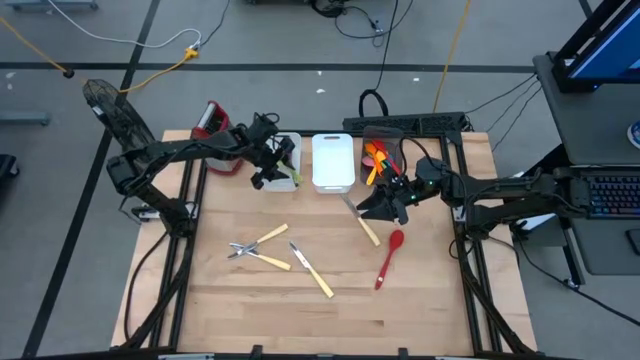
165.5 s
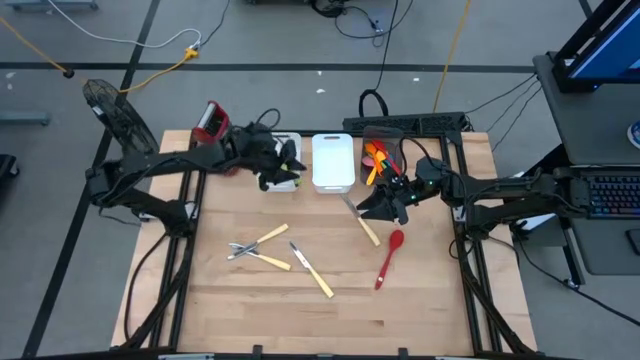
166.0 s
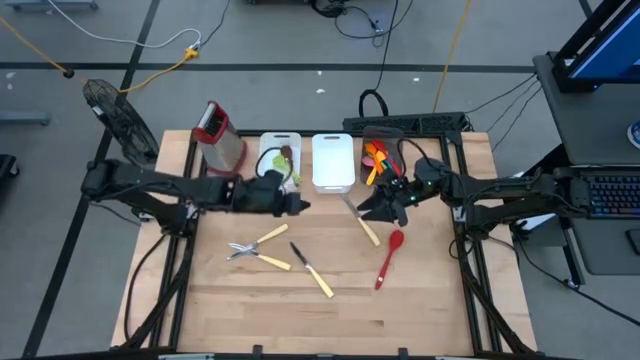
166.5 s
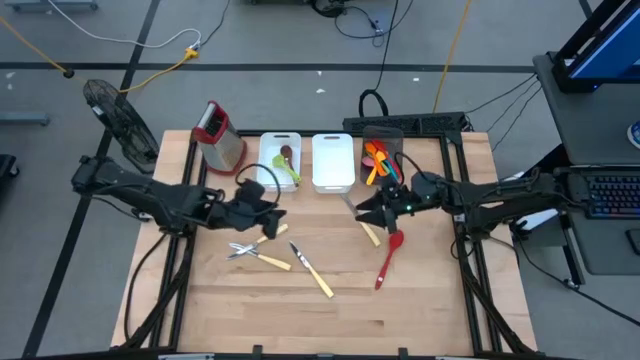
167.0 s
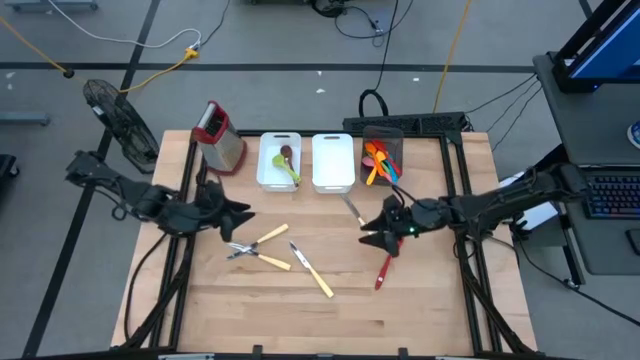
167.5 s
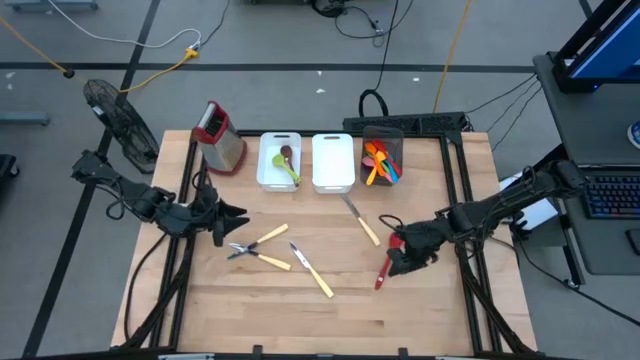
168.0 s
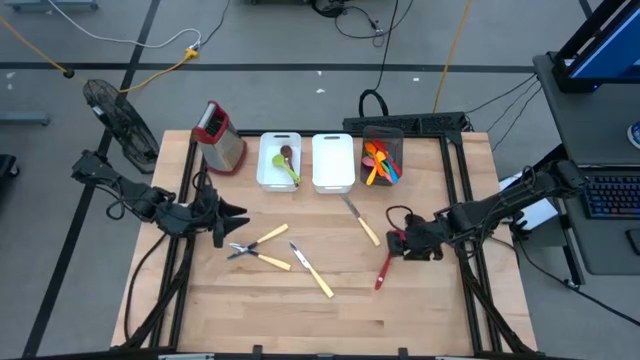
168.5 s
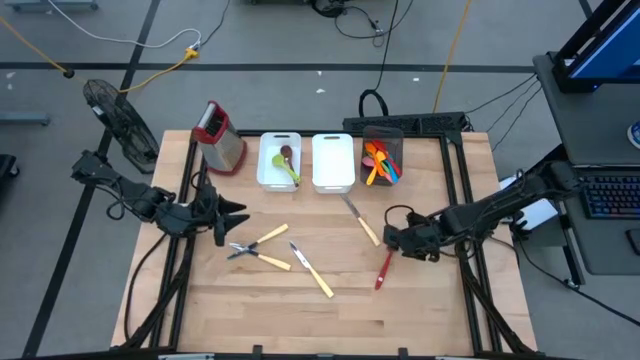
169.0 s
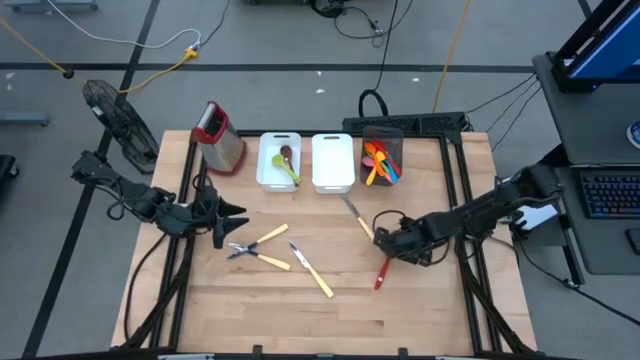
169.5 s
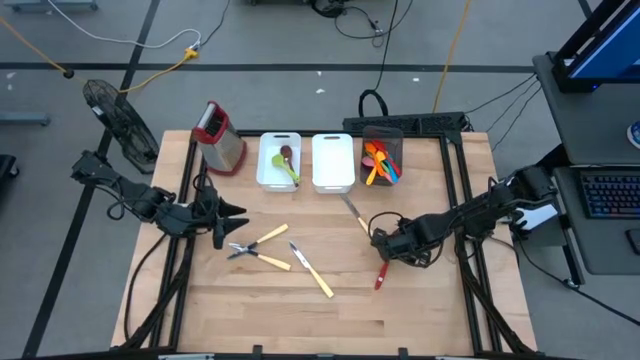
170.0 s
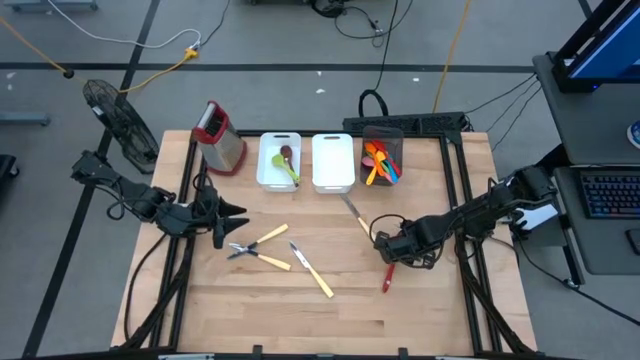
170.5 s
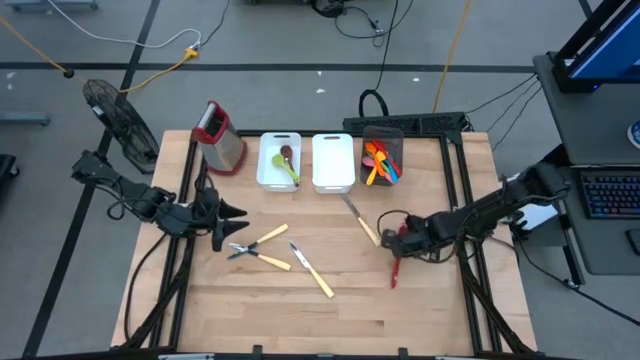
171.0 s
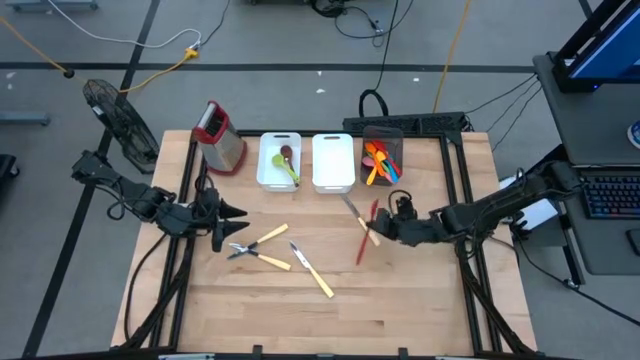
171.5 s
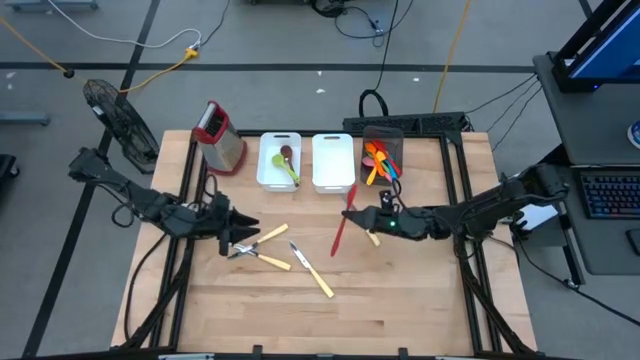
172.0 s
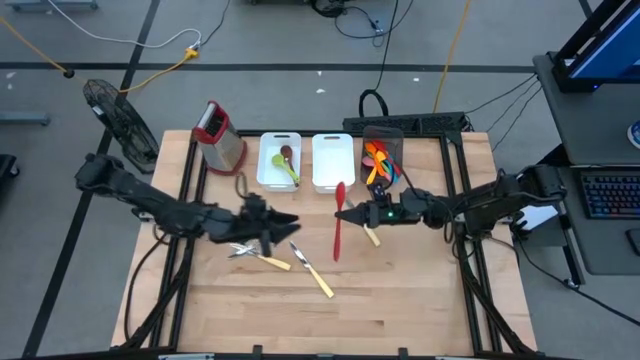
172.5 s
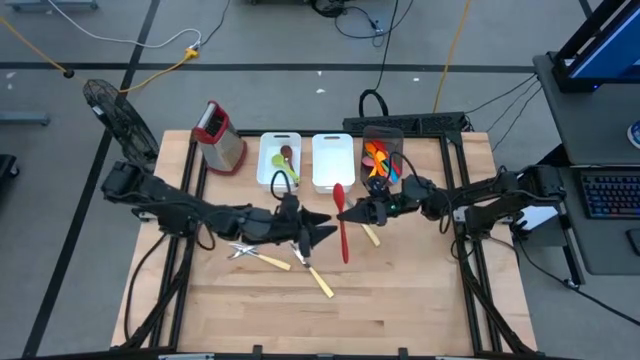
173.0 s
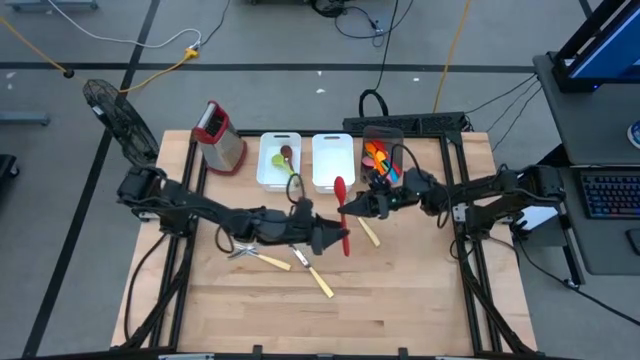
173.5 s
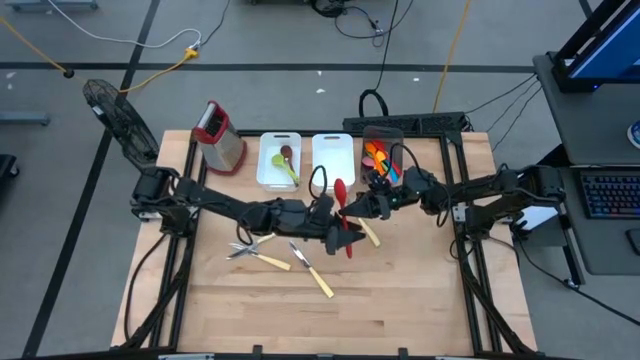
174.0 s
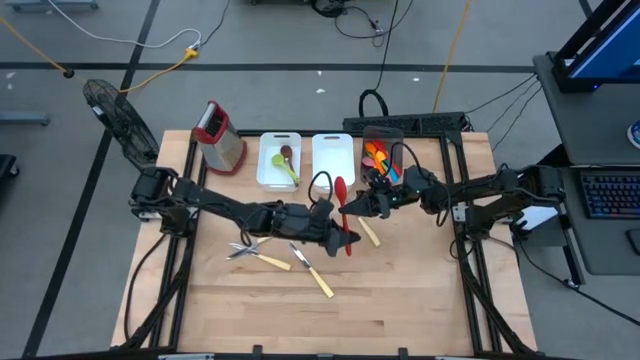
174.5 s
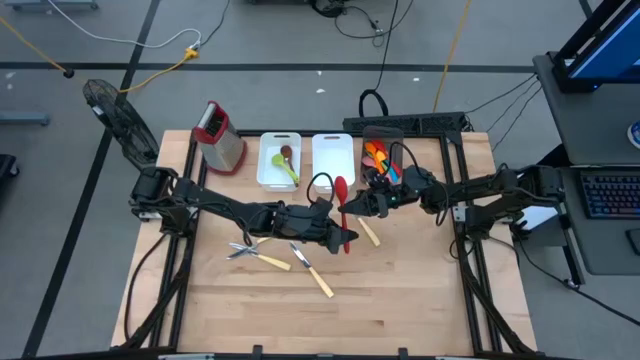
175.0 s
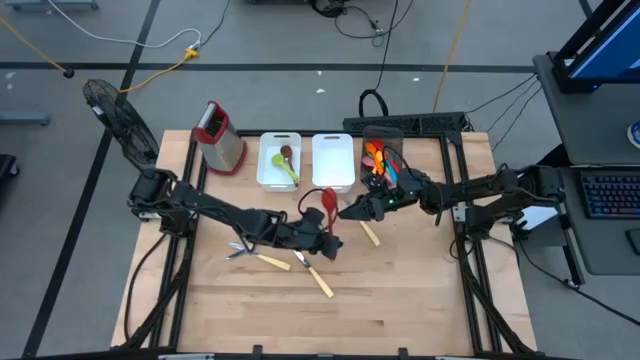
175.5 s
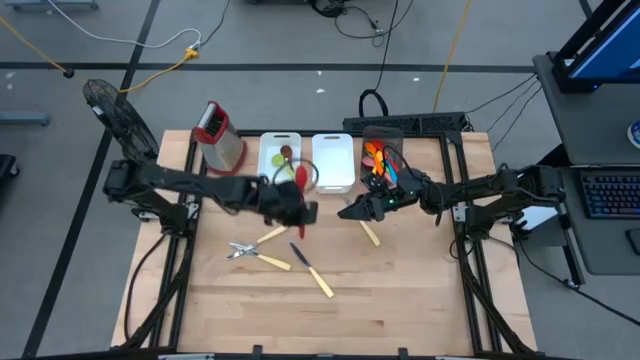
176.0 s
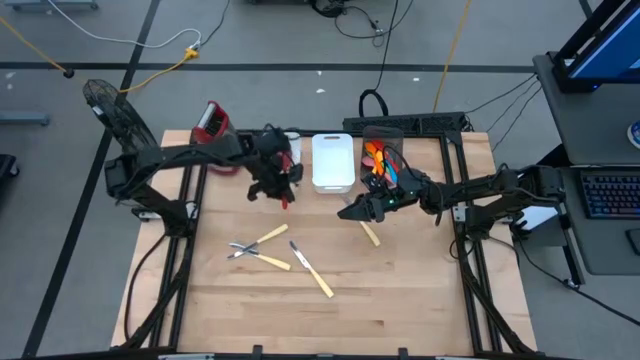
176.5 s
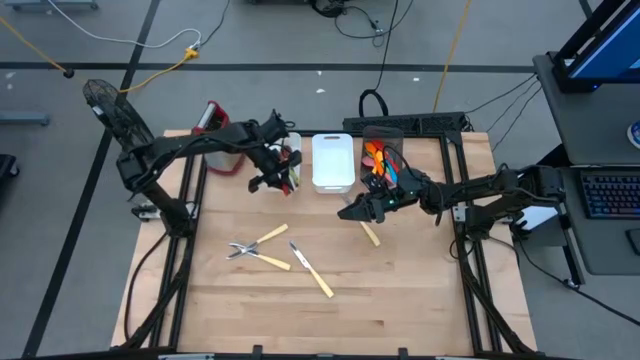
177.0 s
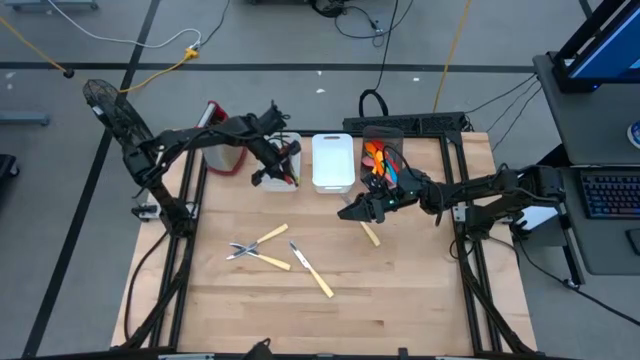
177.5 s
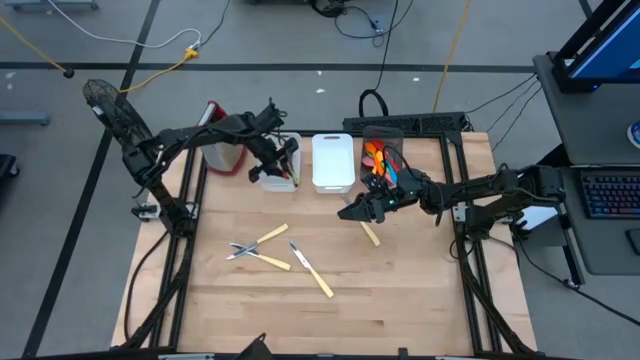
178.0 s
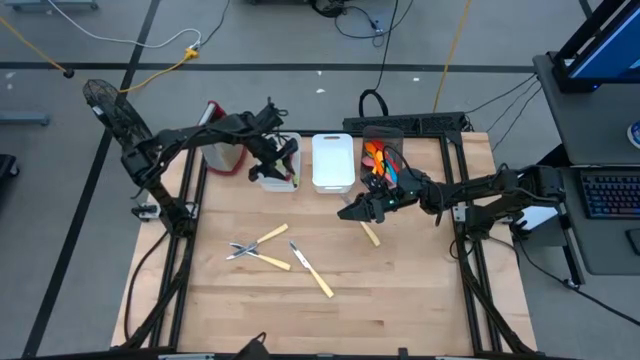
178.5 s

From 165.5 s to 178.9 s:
Task: Pick & Place Kitchen Items
Put the red serving spoon into the left white bin

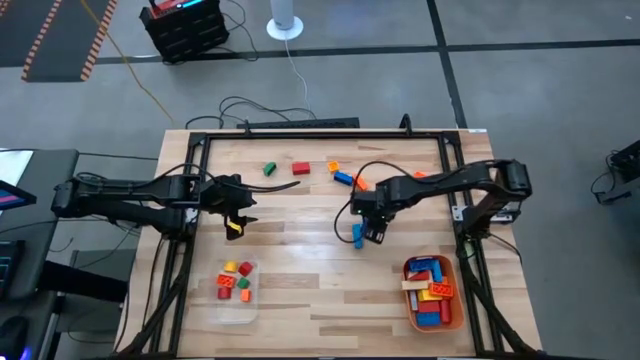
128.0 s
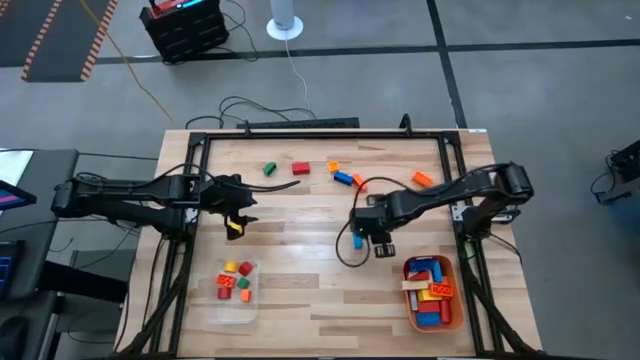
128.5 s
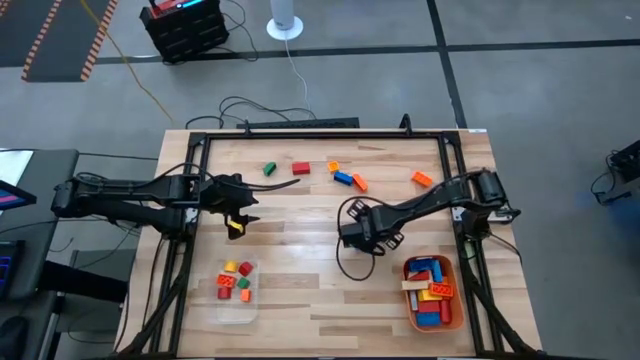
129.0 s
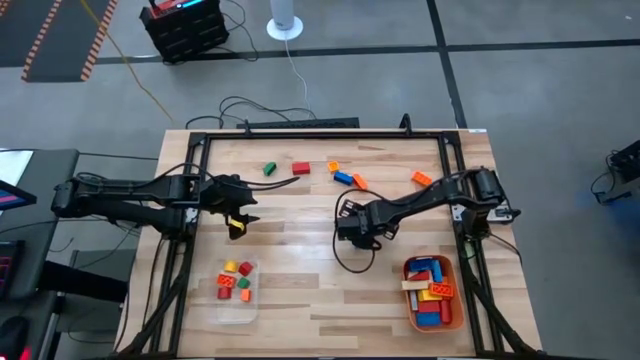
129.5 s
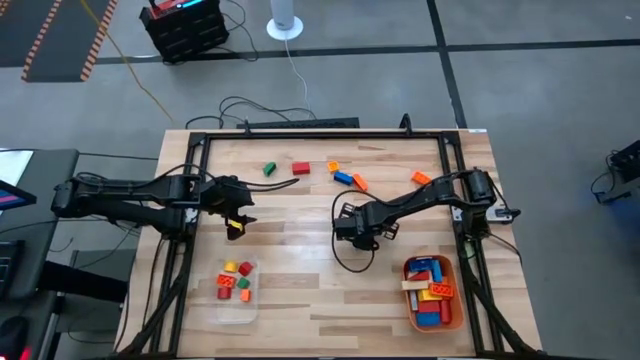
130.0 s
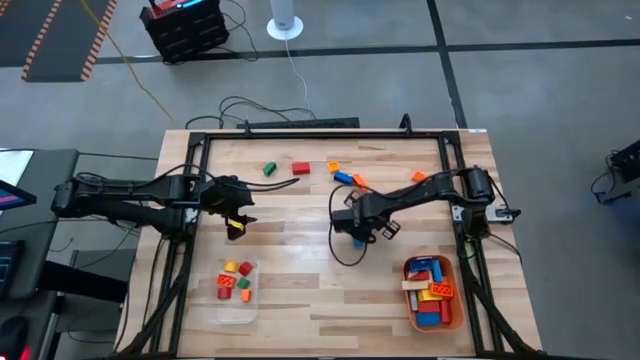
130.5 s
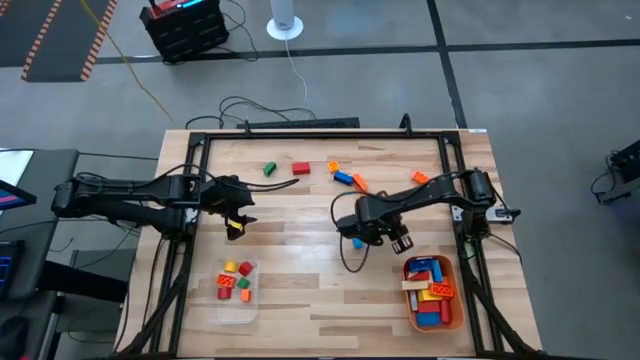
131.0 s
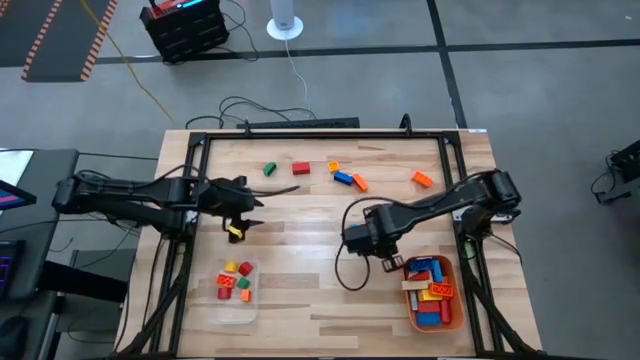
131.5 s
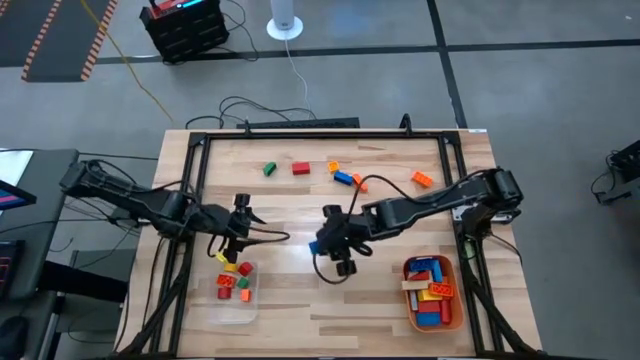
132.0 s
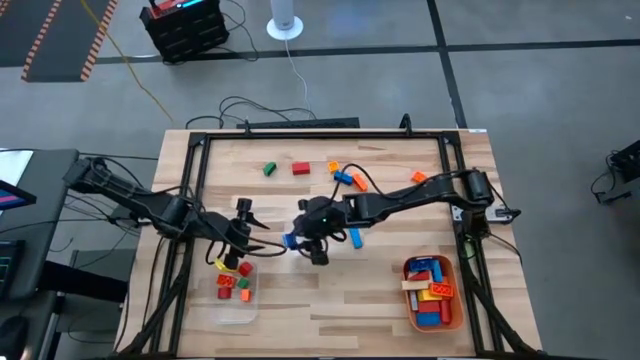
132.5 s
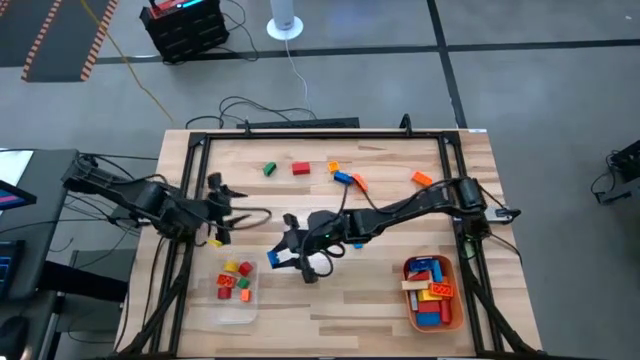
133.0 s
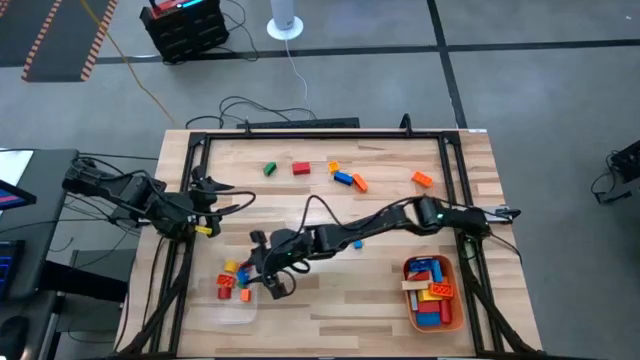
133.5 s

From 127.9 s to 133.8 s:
Task: Sort blocks by size
Put the small blue game piece into the transparent bin

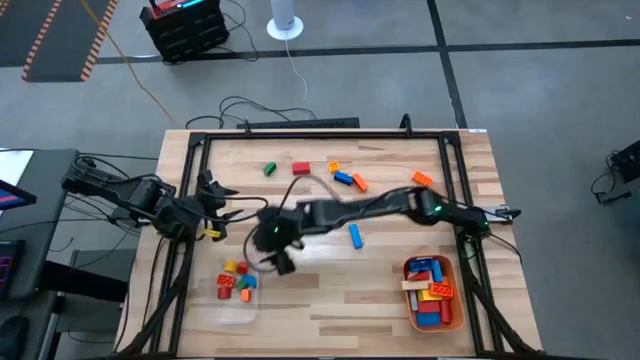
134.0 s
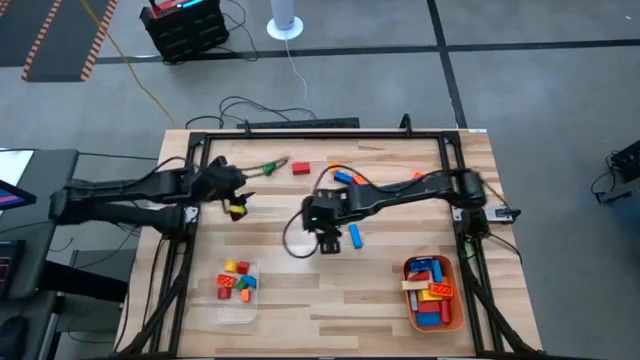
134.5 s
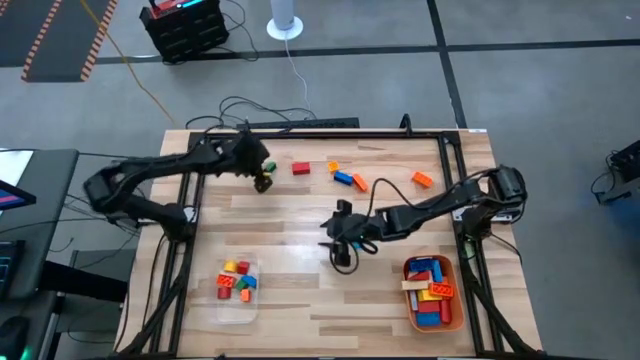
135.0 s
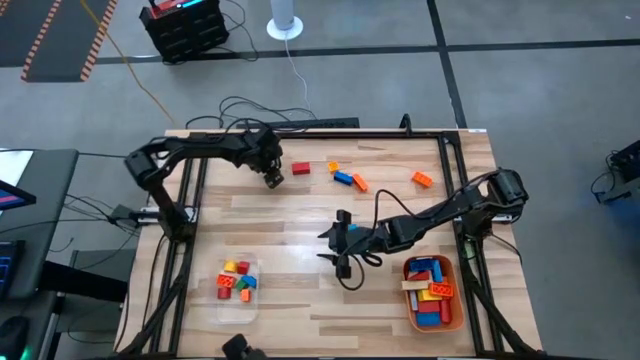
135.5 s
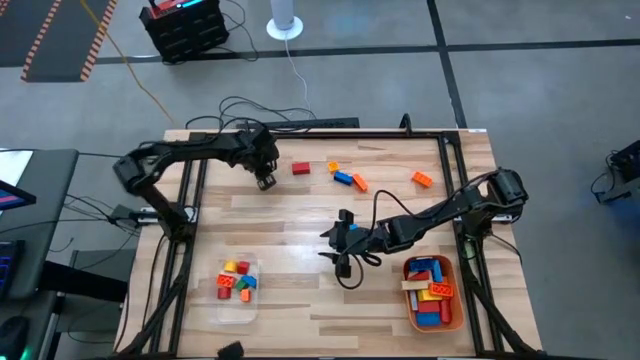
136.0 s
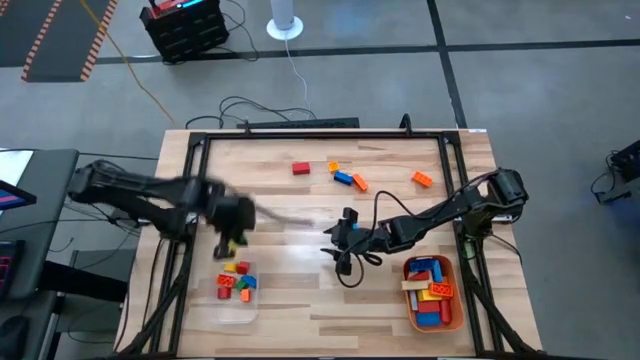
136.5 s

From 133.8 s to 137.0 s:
Put the small green game piece into the transparent bin
